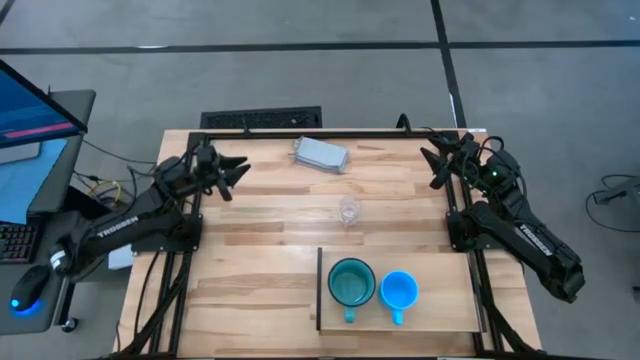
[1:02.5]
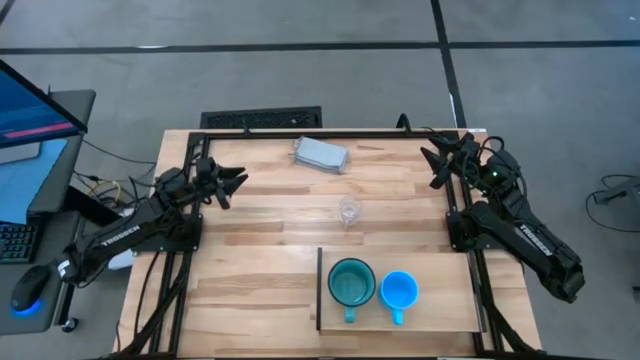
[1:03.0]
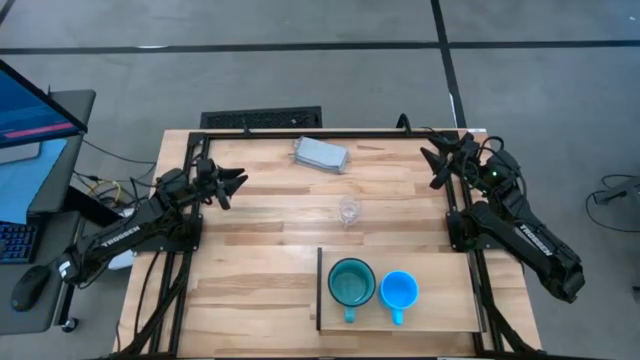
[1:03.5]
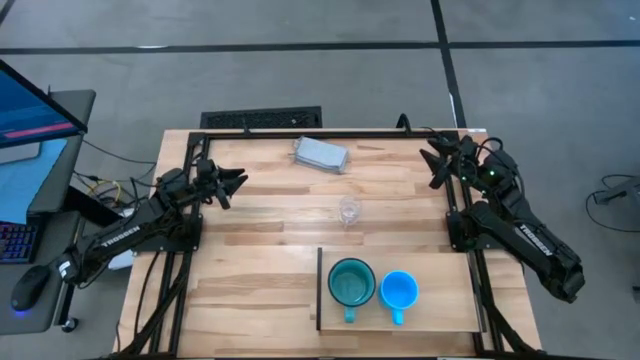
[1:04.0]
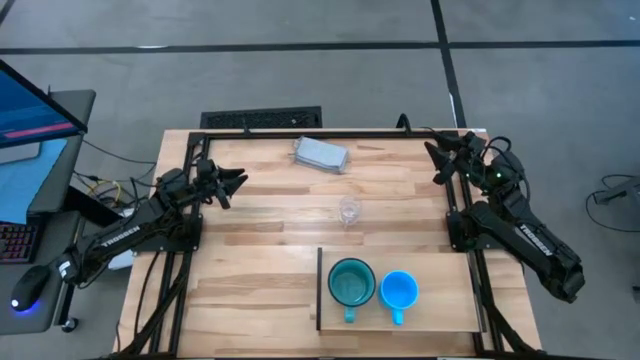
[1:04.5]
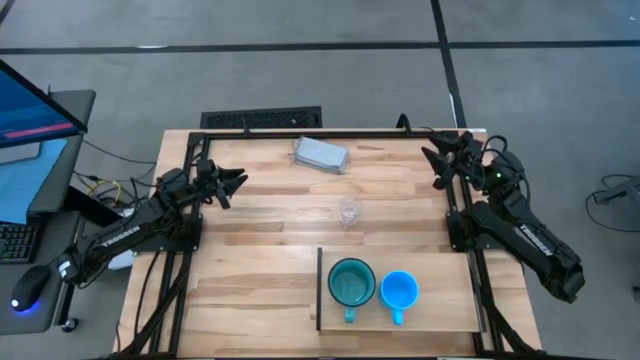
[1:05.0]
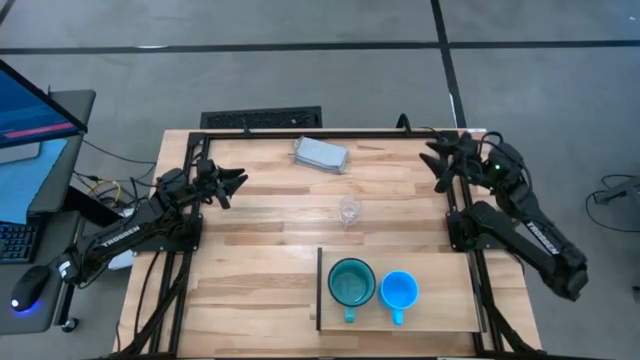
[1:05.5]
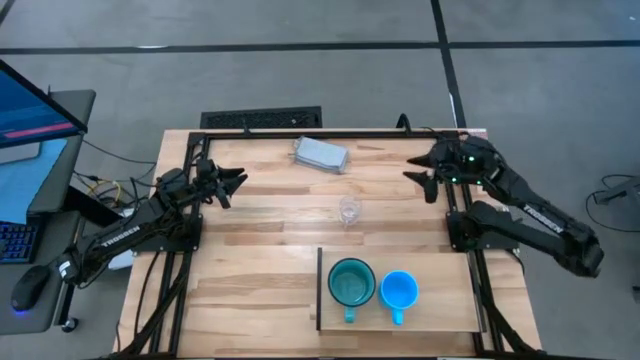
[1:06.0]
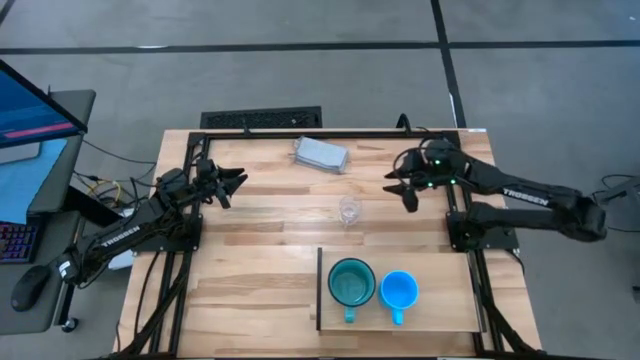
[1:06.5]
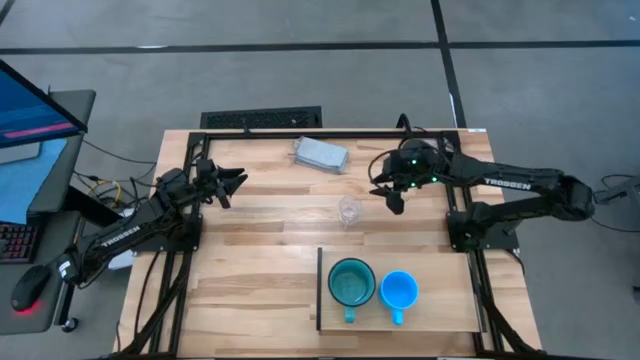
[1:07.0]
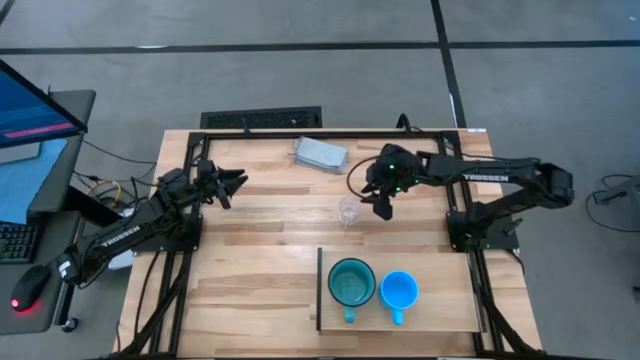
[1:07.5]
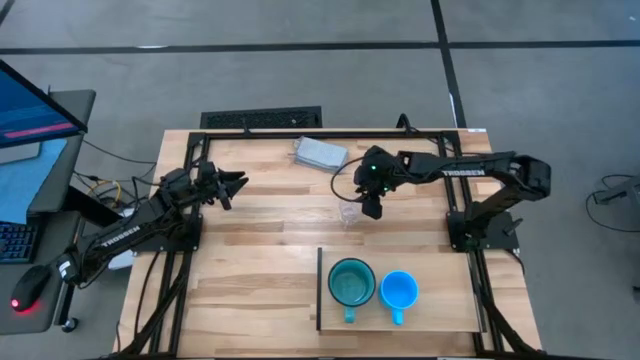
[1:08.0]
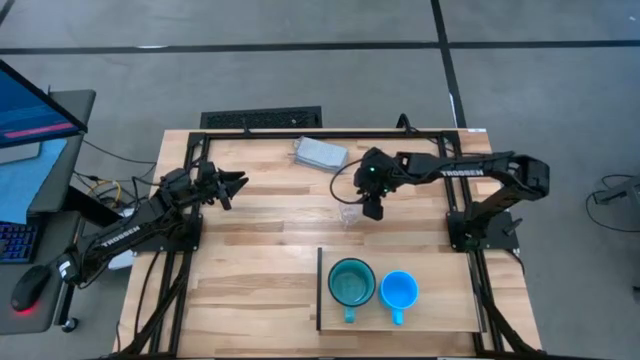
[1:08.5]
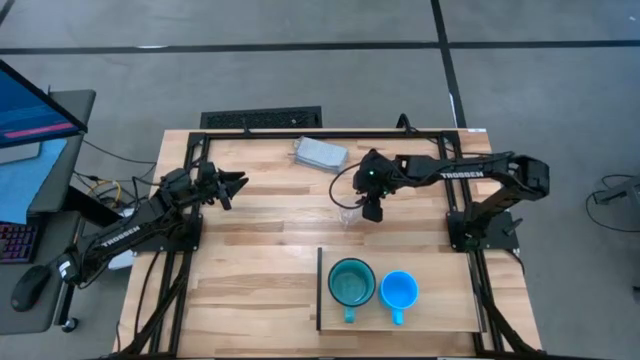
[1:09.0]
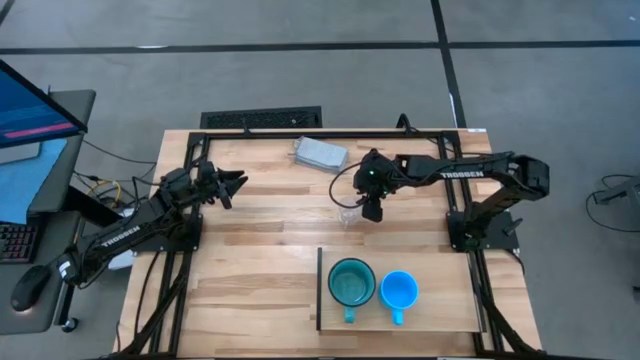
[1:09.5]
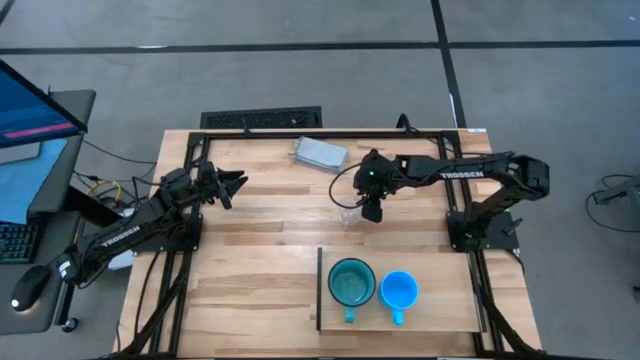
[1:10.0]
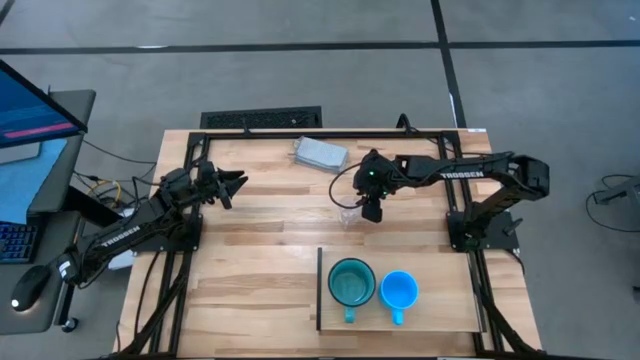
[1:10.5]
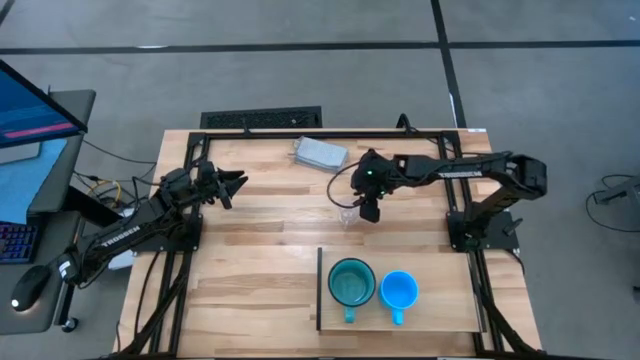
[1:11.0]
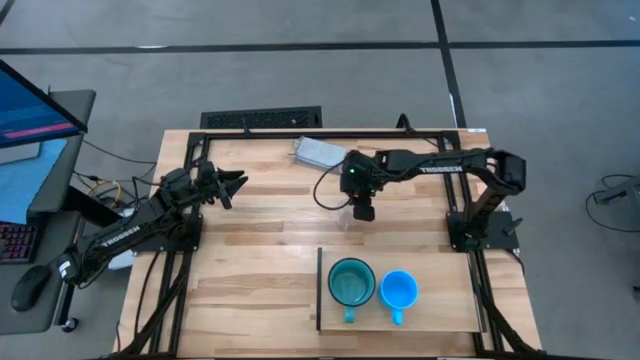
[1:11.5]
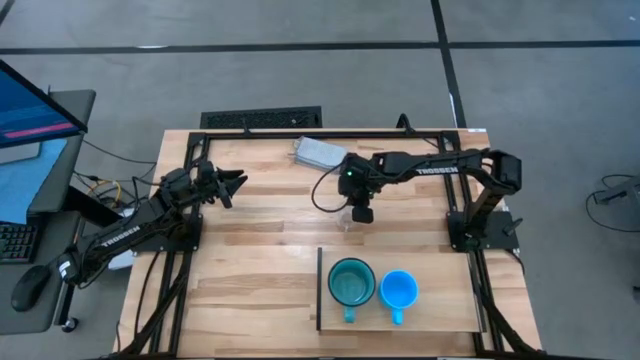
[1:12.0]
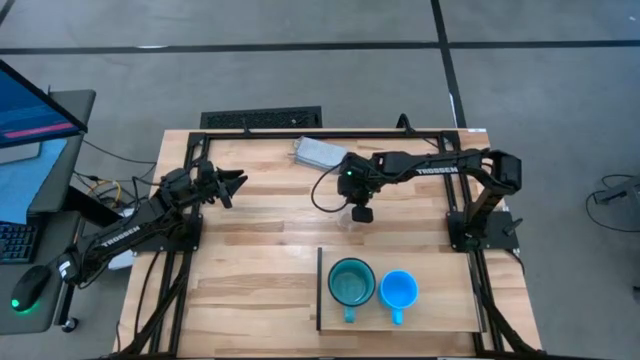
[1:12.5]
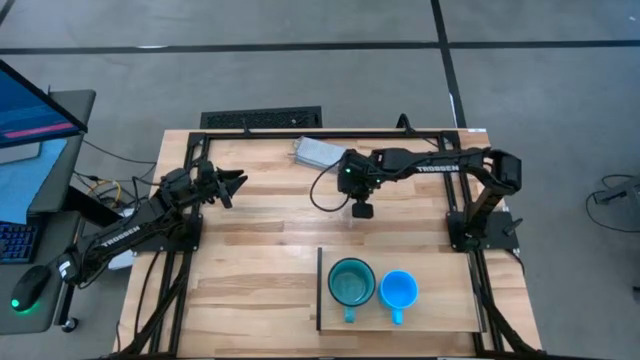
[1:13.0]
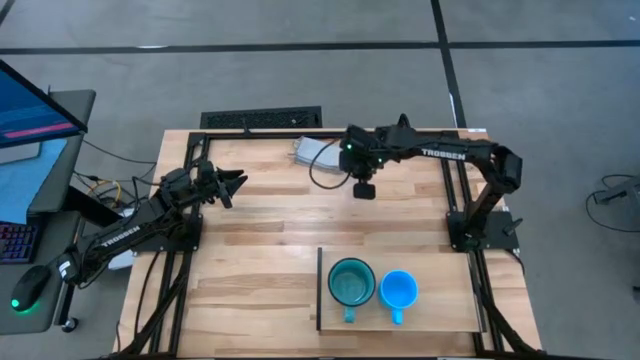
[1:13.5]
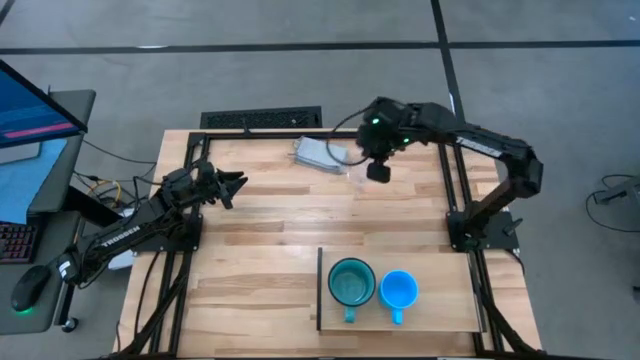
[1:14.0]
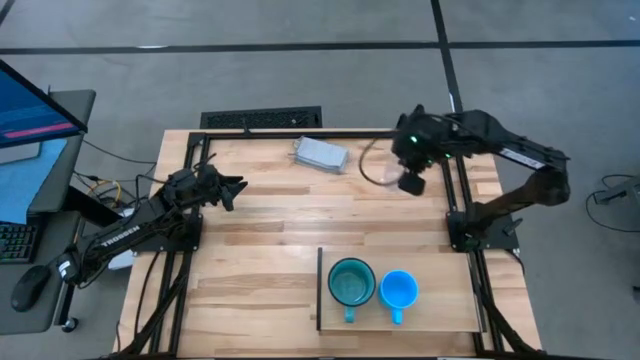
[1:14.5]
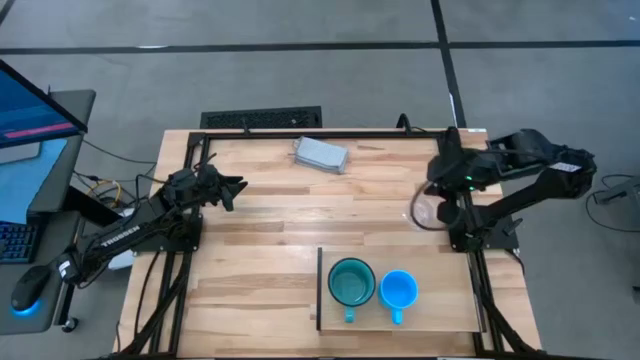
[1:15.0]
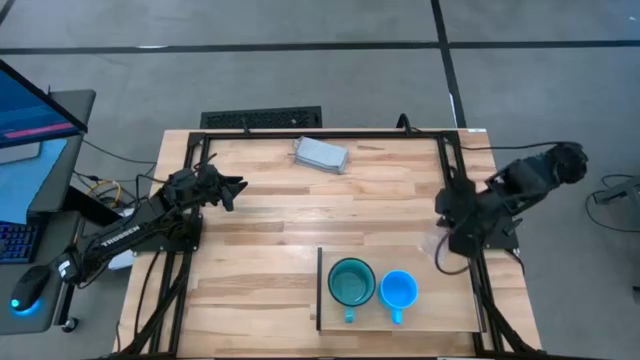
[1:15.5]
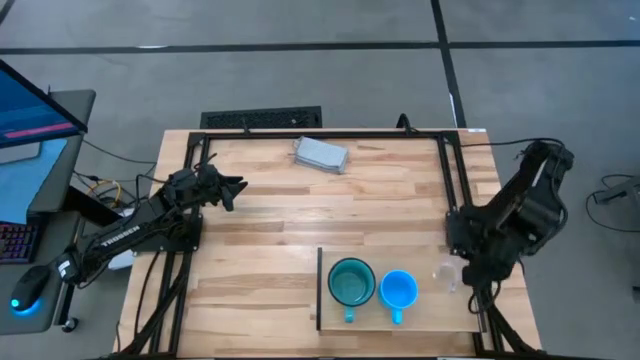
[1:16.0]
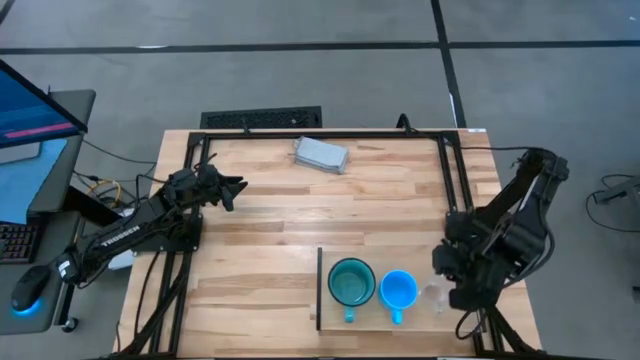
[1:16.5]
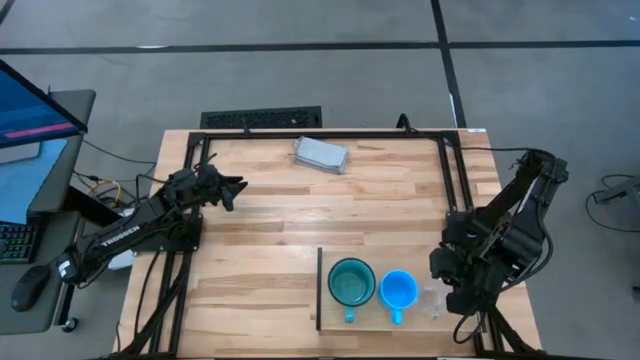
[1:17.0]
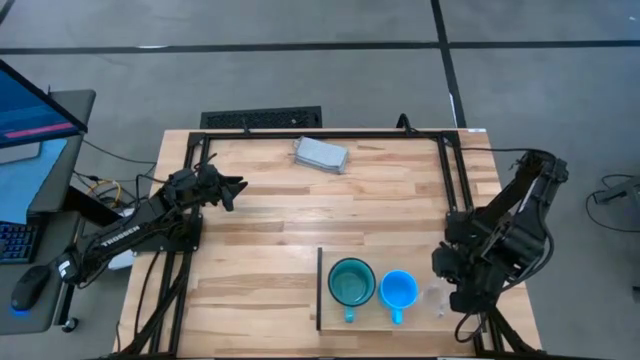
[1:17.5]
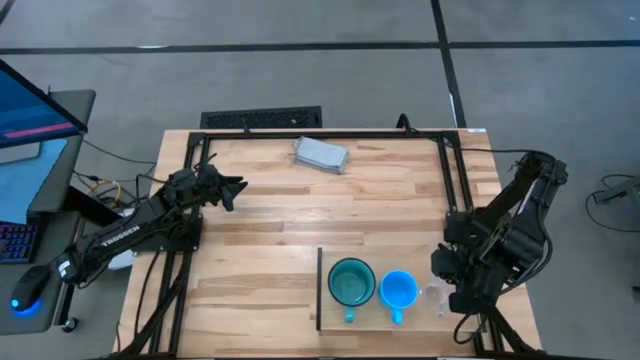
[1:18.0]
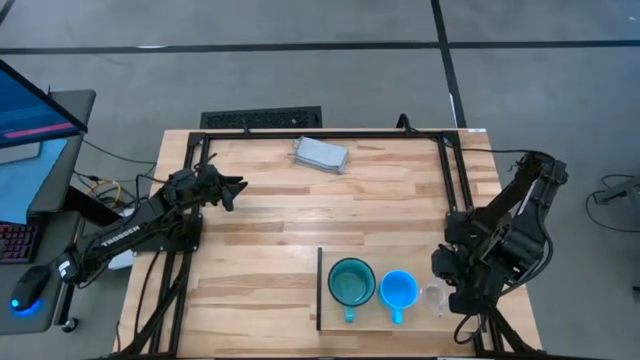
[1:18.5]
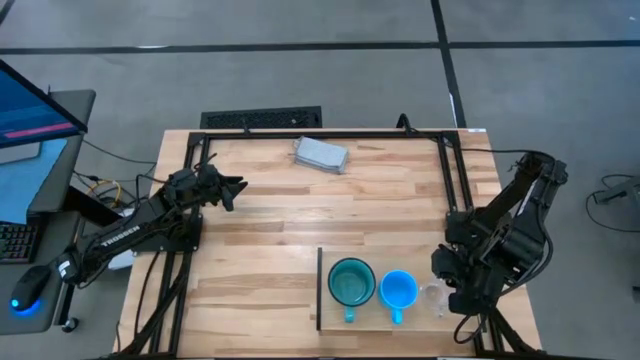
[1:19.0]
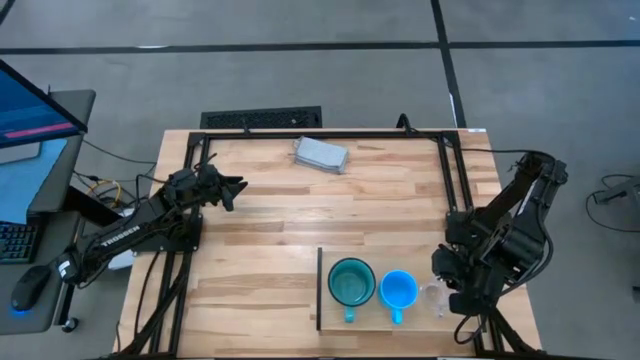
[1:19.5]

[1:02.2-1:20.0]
Task: Stack small to large cups/mugs on shelf
Put the transparent mug on the shelf

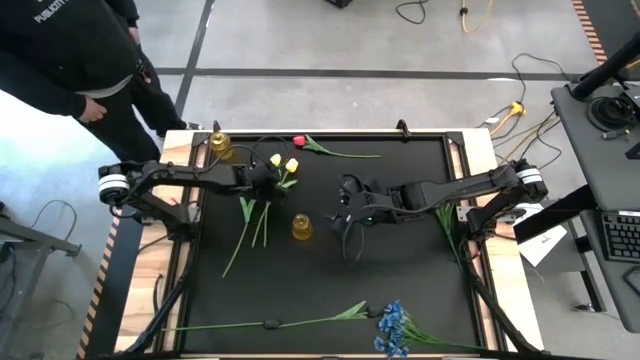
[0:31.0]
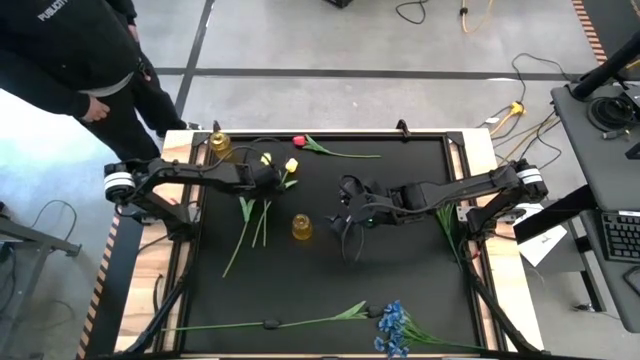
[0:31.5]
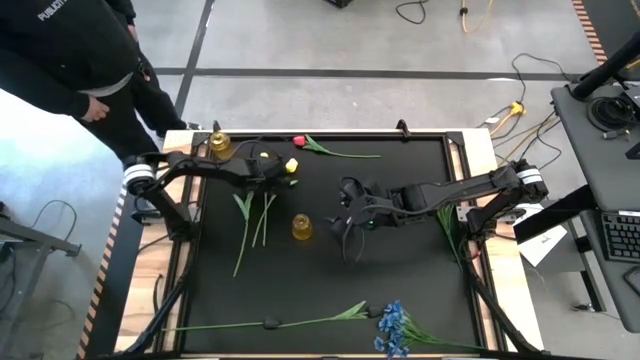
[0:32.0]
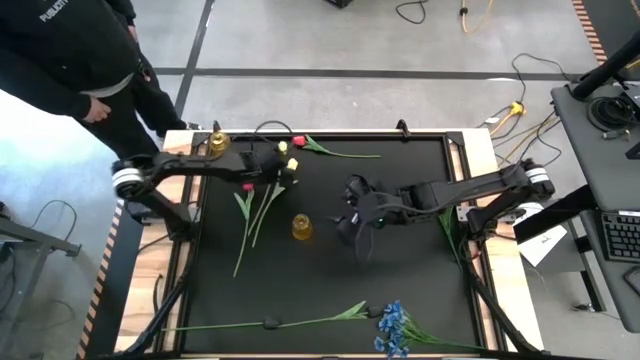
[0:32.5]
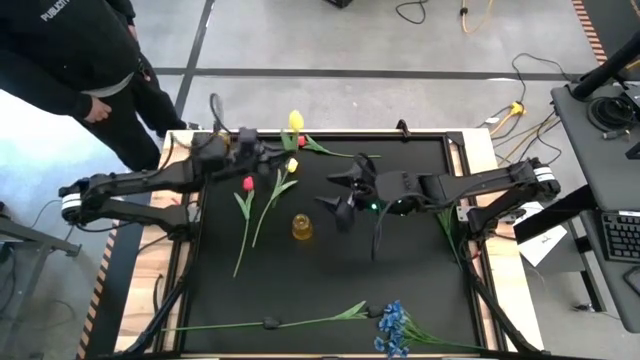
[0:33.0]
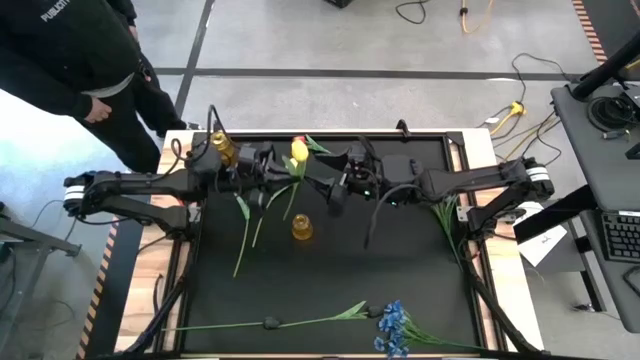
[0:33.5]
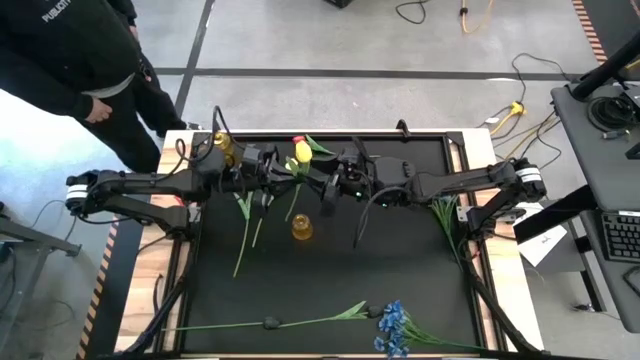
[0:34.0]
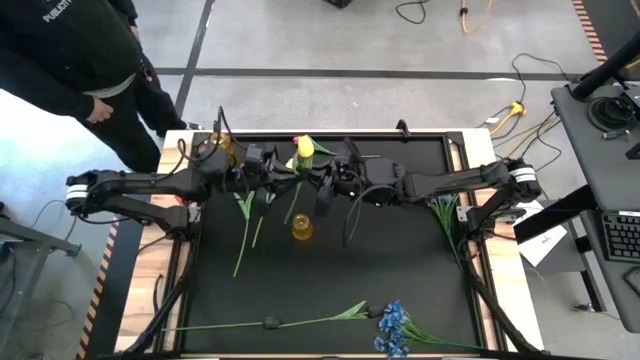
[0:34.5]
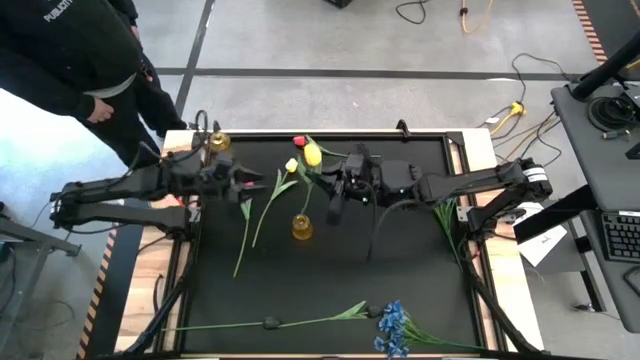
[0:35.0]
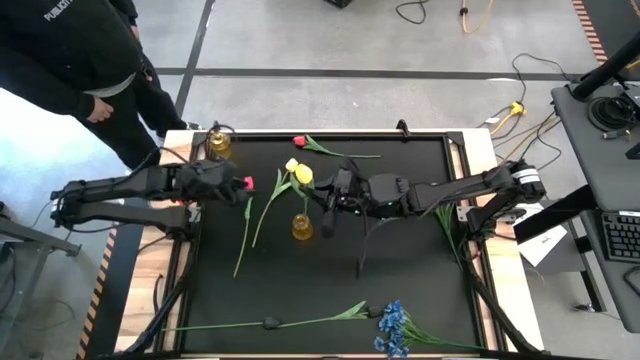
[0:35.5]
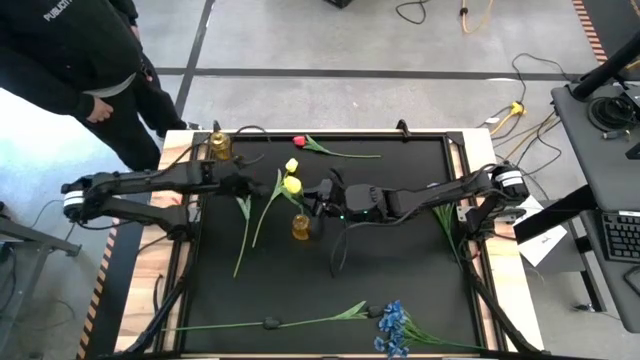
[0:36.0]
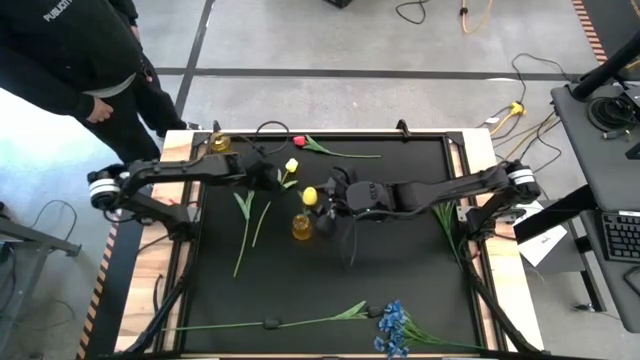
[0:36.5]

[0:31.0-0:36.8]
Task: Sort flowers into vase by color
Put the left yellow tulip into the yellow vase
